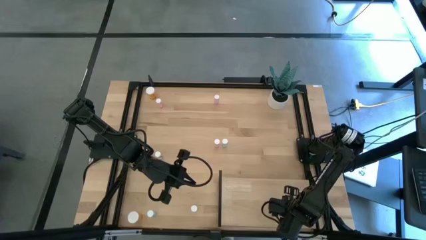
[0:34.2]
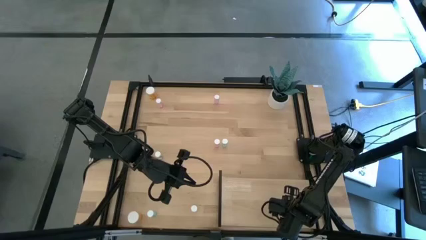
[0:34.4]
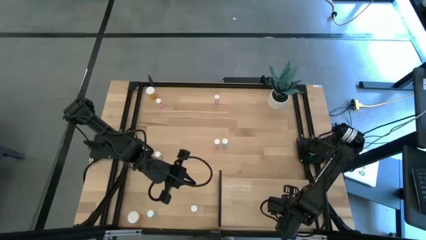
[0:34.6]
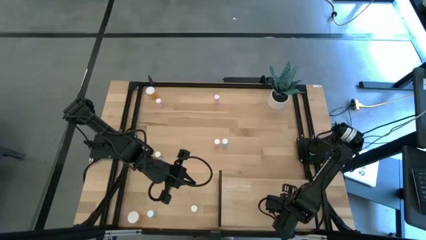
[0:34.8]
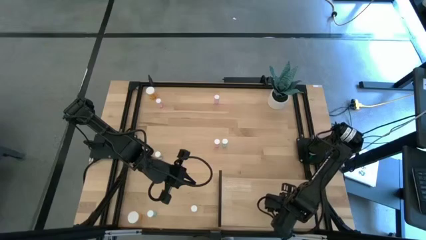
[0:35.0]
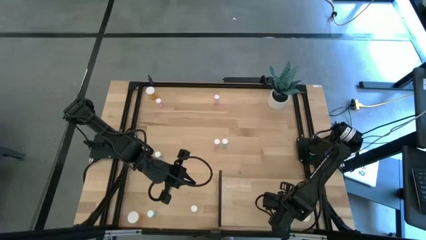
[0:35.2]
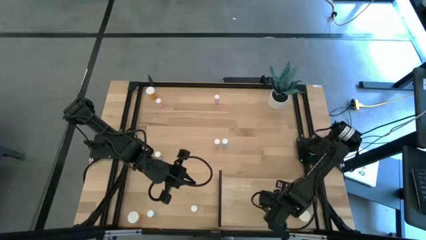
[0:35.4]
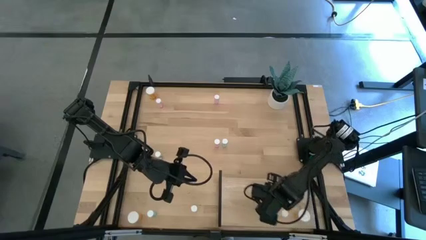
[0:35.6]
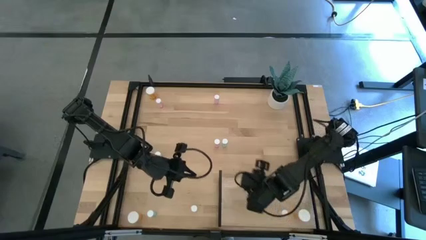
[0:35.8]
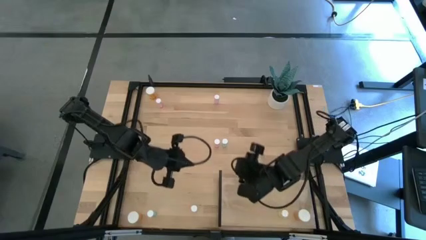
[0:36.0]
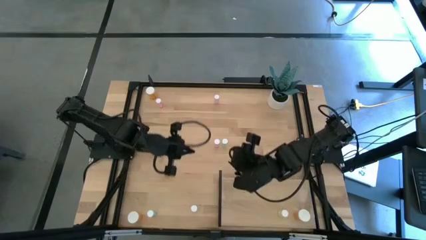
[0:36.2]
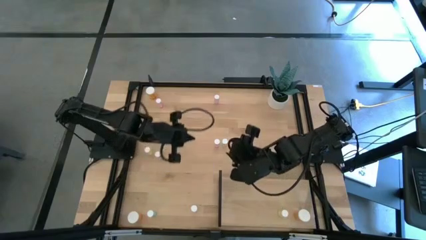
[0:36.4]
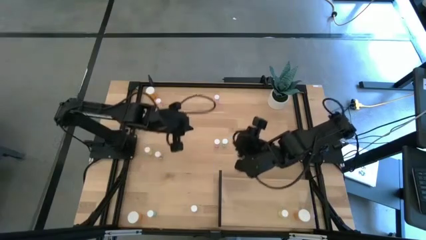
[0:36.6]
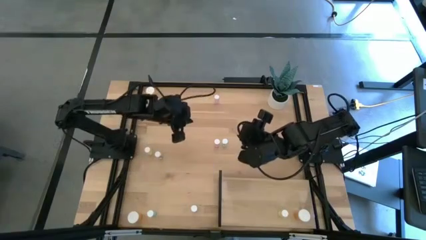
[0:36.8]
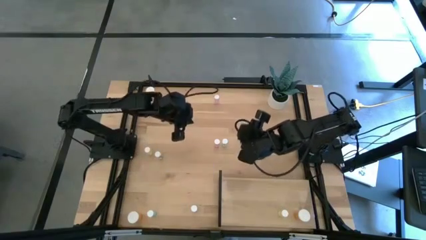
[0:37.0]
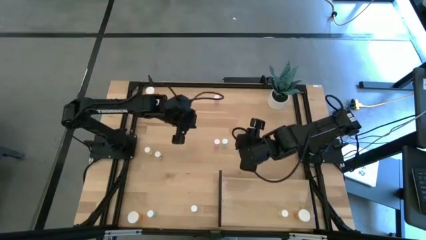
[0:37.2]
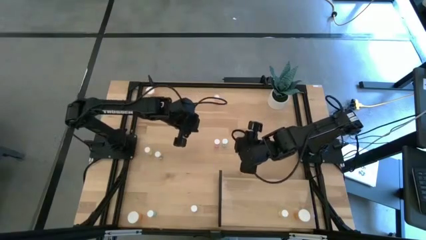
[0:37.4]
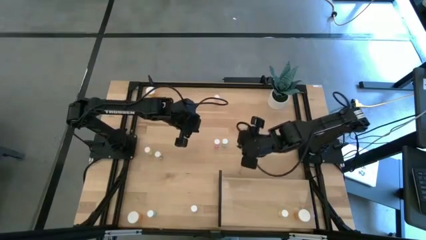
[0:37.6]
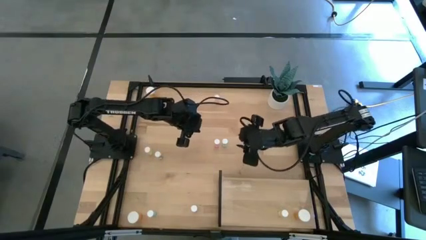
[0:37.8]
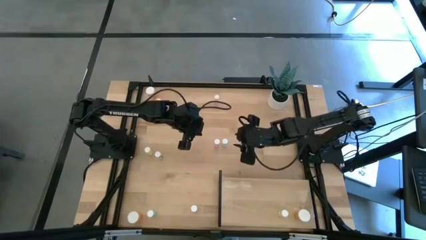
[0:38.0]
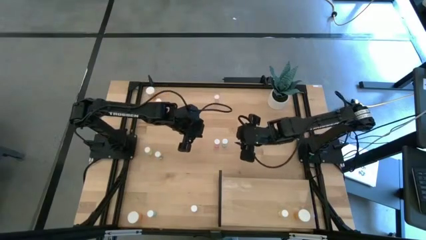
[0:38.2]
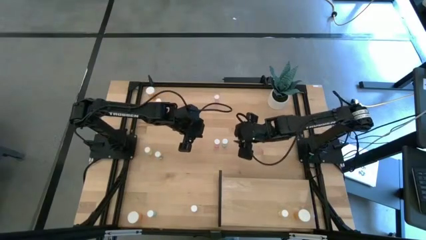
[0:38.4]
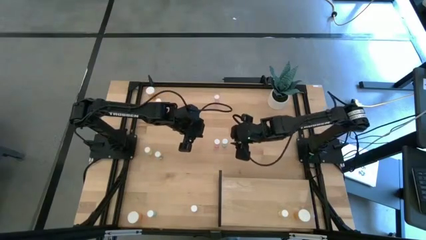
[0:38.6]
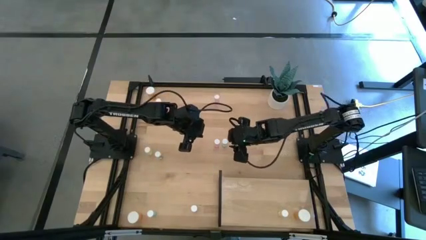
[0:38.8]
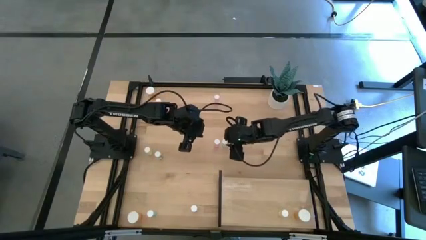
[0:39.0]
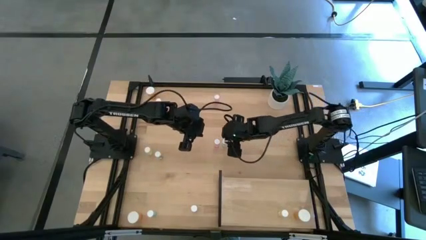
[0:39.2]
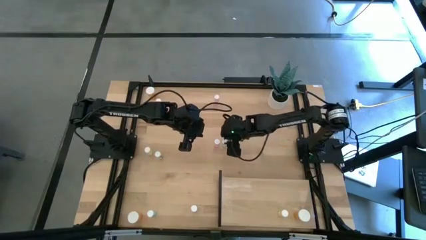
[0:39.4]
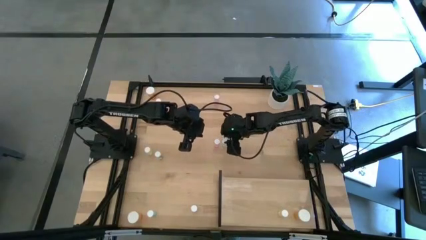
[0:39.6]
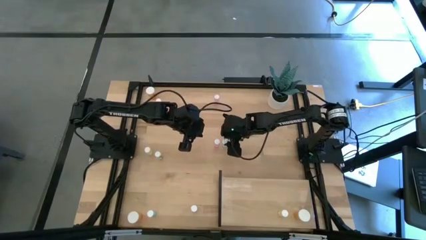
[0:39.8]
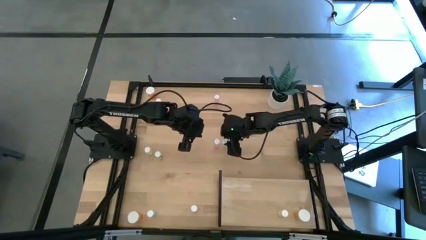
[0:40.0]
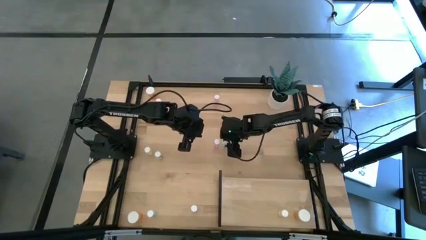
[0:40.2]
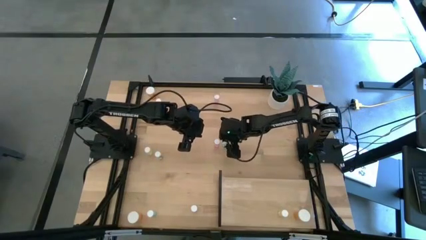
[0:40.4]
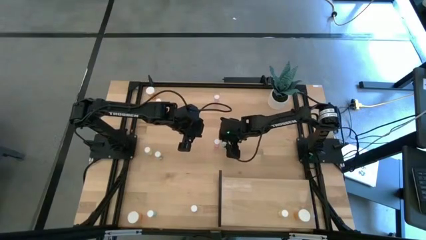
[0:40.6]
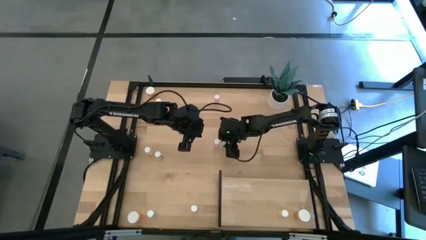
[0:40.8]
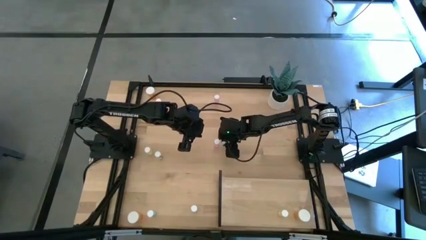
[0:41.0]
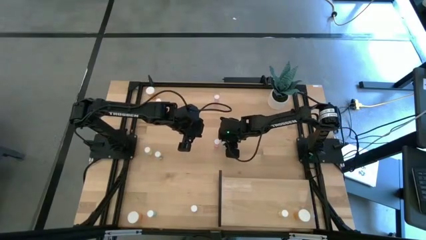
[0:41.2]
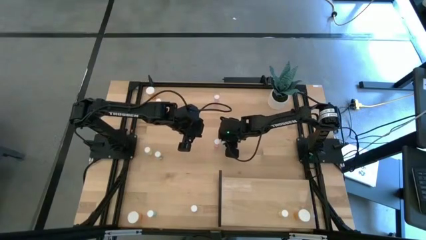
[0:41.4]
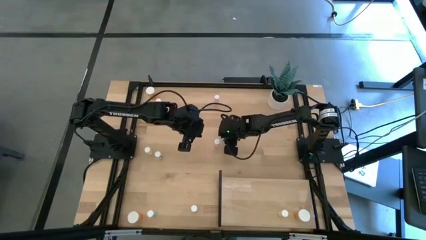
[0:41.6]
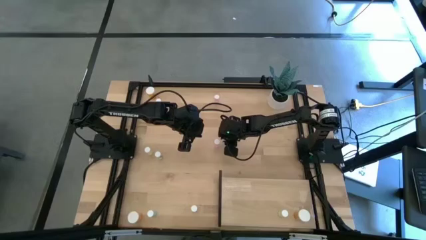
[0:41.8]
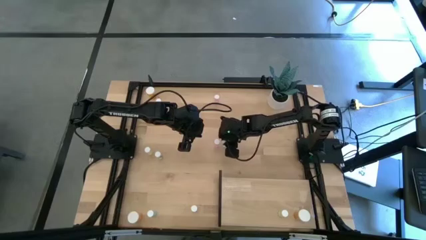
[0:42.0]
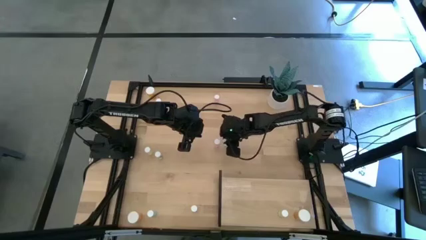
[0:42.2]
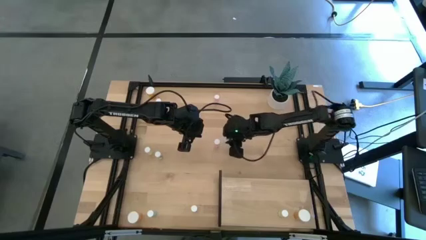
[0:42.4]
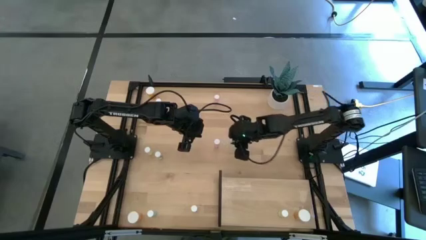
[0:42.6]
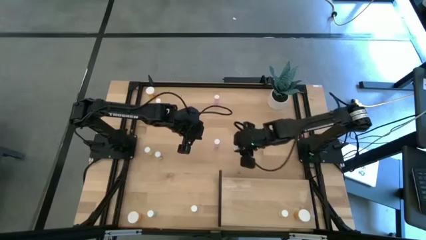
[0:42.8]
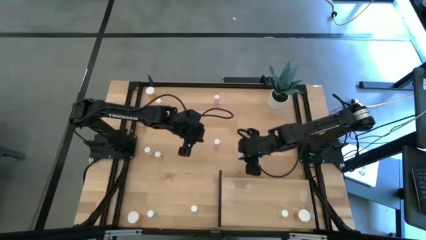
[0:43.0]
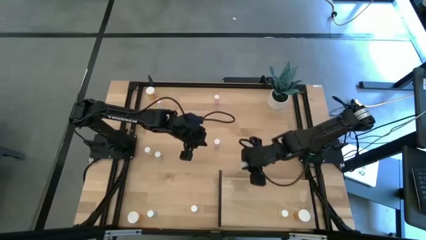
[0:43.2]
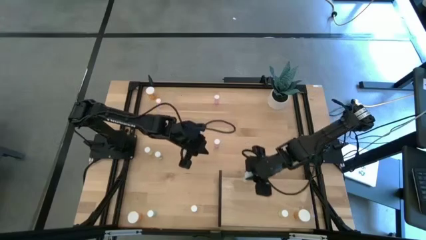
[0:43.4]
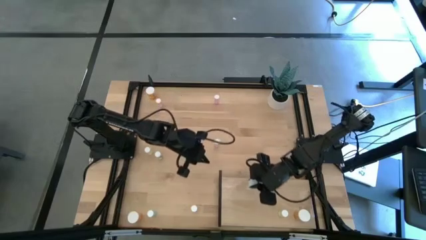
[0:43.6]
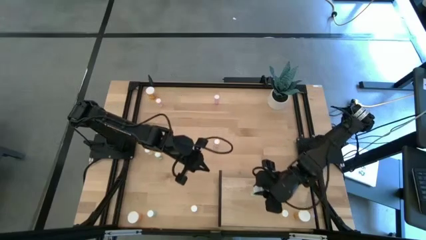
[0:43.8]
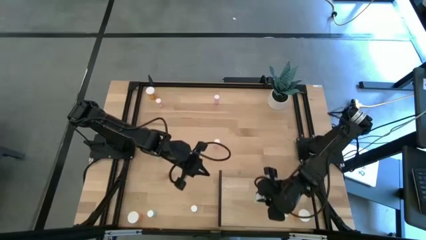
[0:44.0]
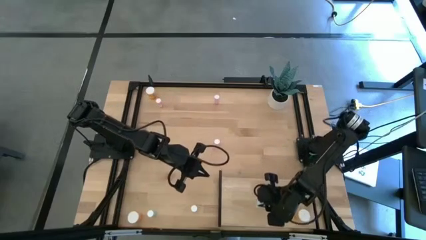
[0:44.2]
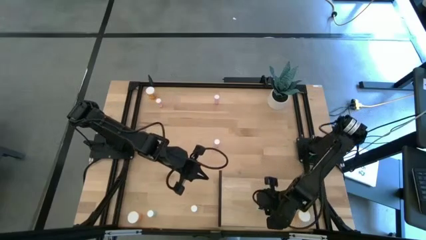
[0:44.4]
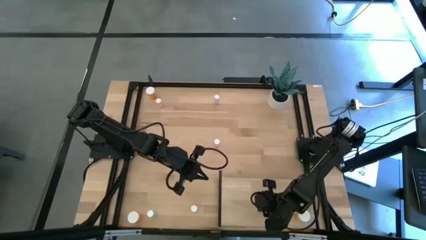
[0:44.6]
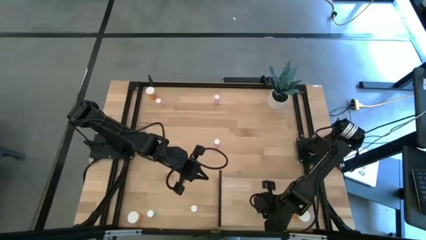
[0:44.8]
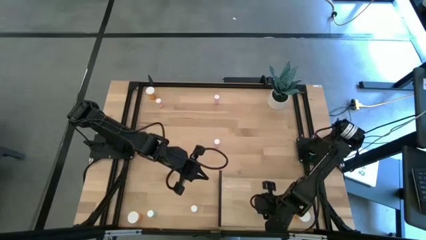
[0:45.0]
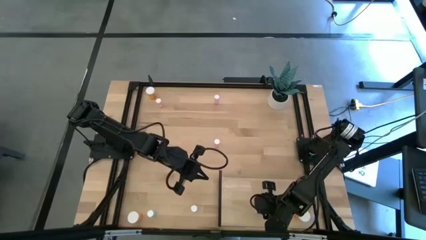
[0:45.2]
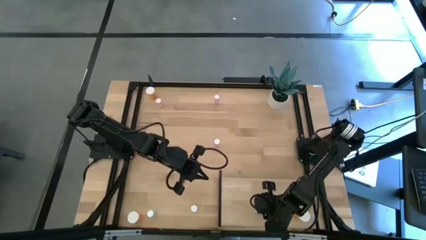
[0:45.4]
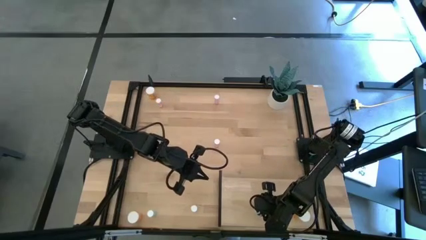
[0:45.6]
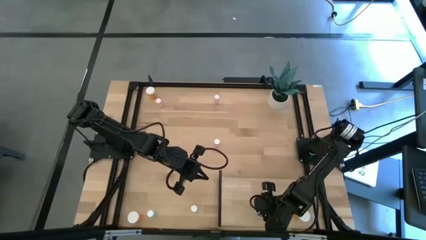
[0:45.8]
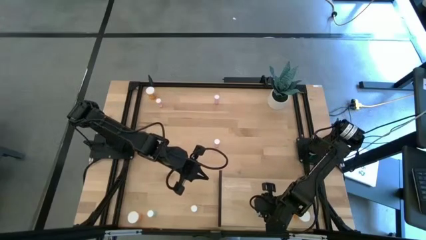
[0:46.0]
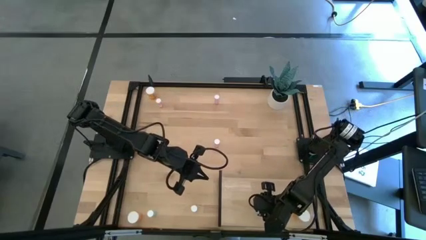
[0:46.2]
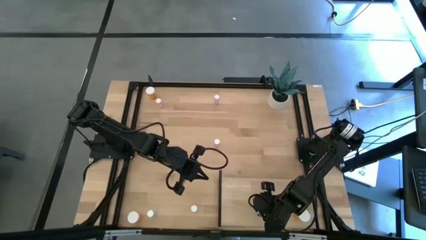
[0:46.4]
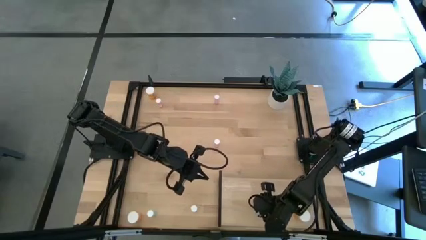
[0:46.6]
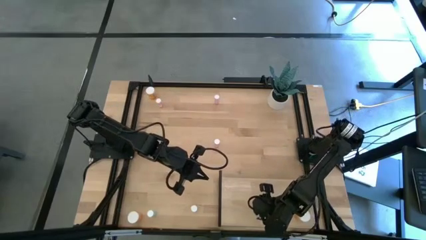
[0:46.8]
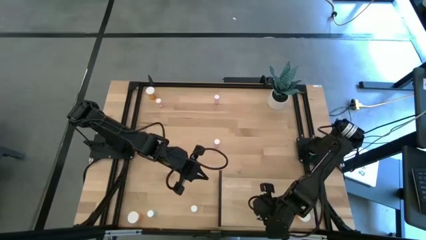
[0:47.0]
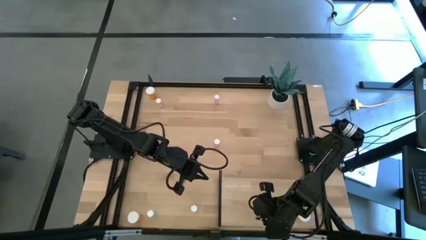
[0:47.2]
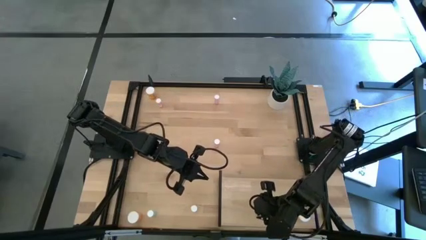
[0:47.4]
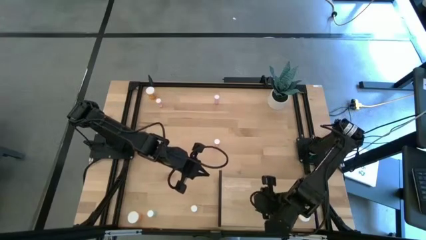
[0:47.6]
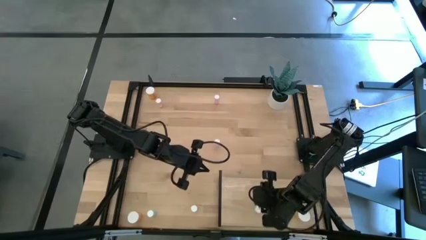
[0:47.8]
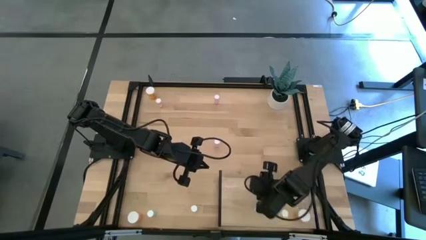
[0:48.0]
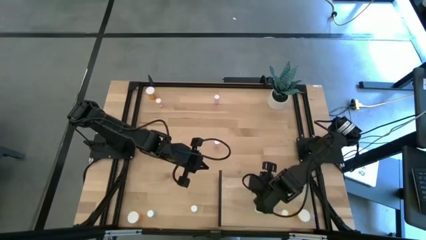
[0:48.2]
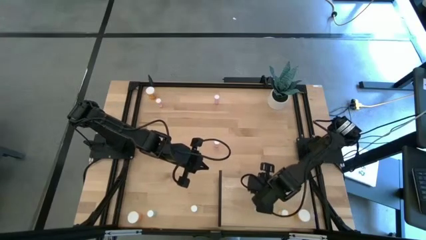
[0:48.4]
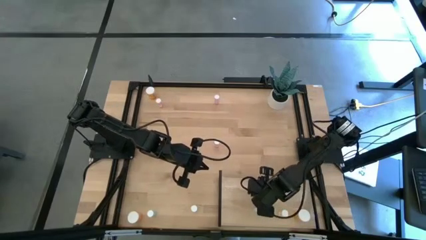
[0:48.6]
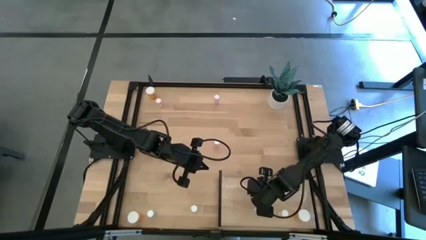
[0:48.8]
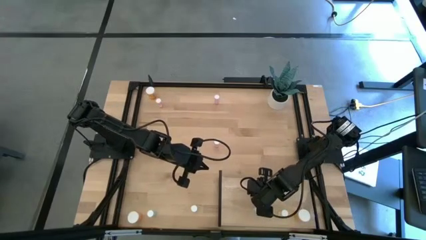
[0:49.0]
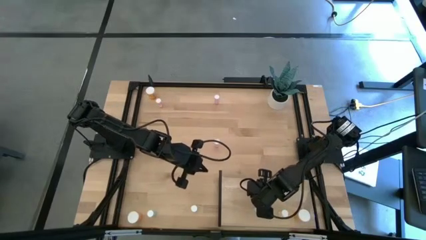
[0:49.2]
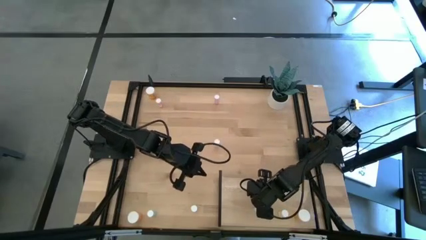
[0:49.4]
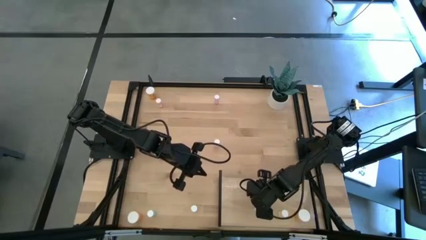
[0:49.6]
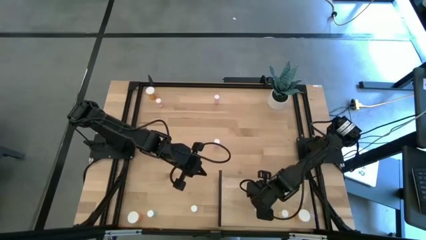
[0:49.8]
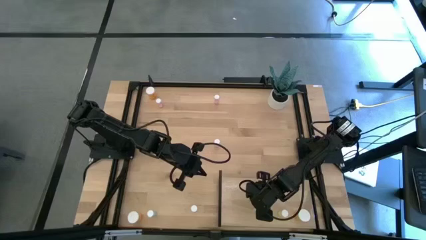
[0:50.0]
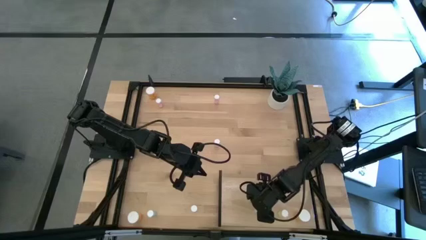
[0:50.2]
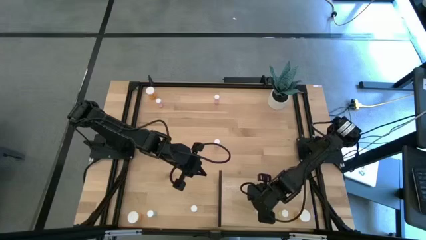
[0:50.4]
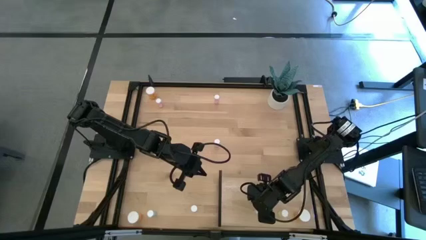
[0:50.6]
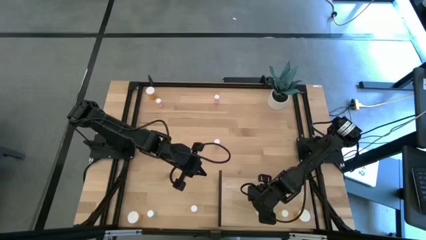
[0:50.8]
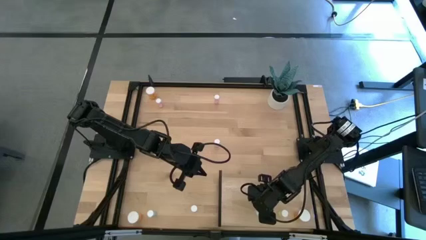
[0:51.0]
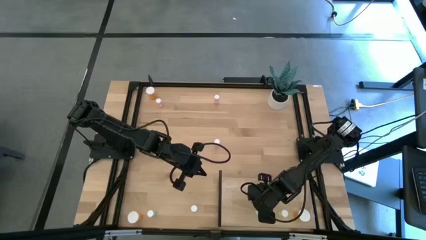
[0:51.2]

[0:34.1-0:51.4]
Task: Pick and place medicine bottles onto shelf by color
Put the middle green pill bottle on the shelf
